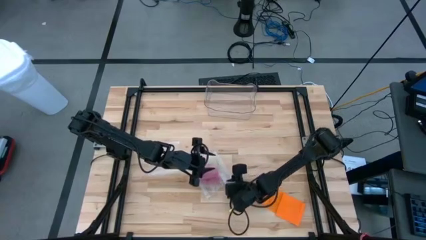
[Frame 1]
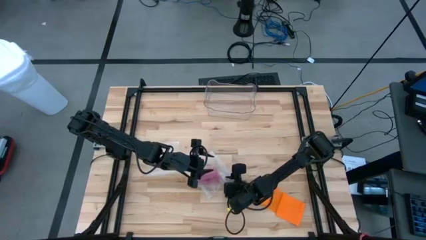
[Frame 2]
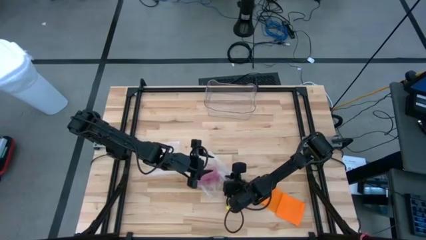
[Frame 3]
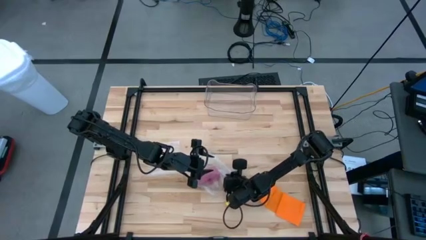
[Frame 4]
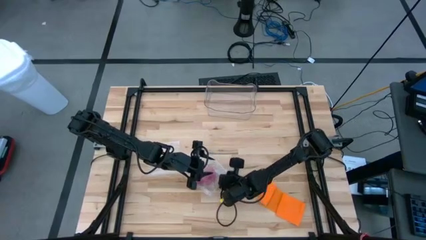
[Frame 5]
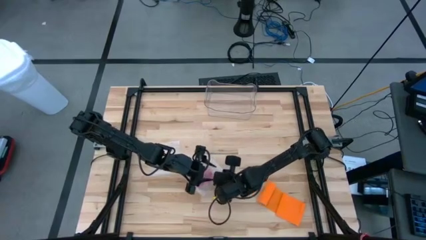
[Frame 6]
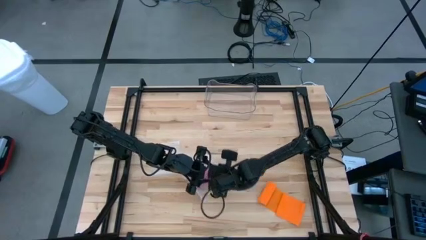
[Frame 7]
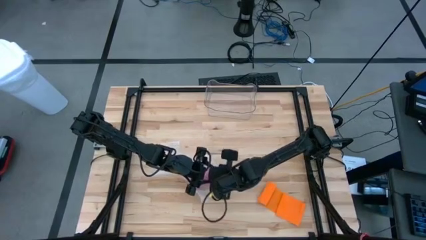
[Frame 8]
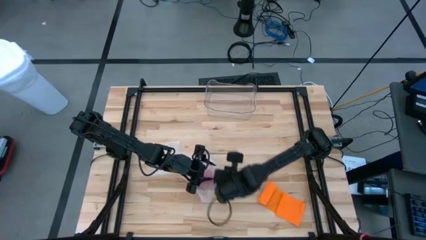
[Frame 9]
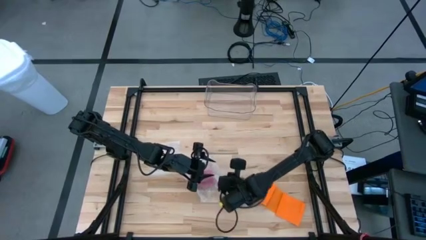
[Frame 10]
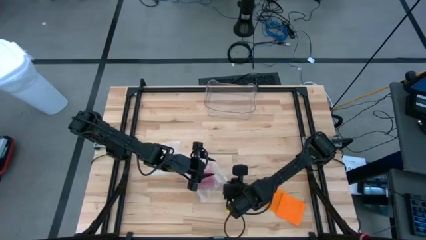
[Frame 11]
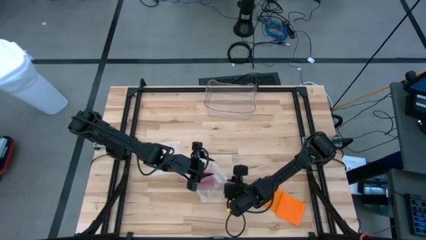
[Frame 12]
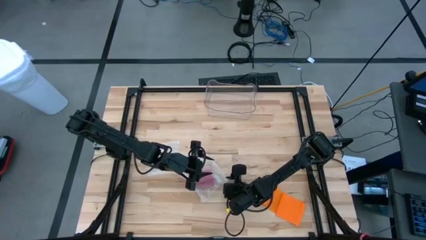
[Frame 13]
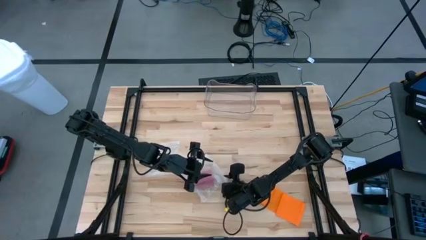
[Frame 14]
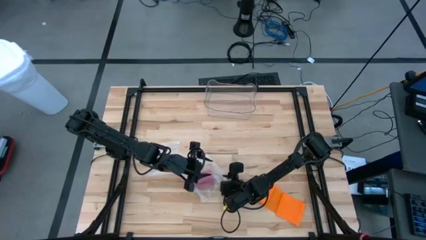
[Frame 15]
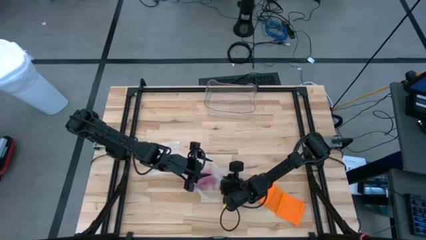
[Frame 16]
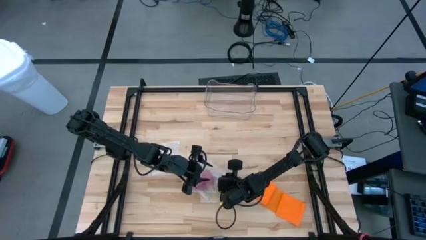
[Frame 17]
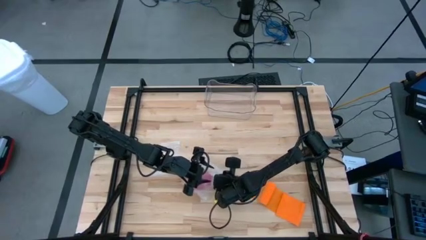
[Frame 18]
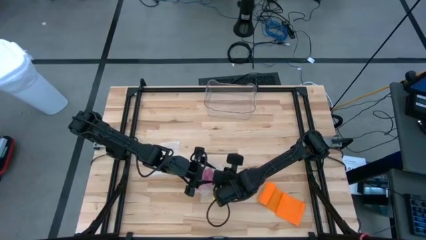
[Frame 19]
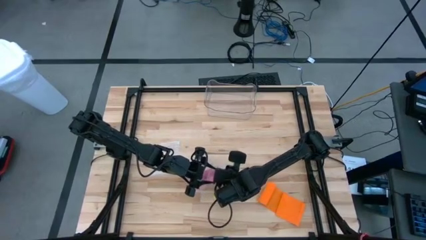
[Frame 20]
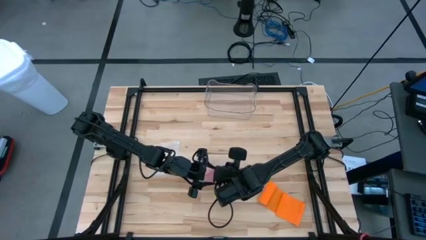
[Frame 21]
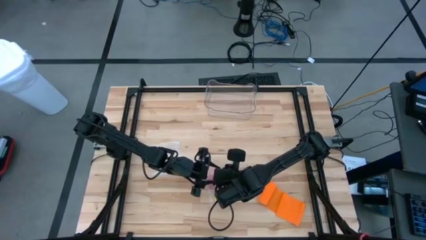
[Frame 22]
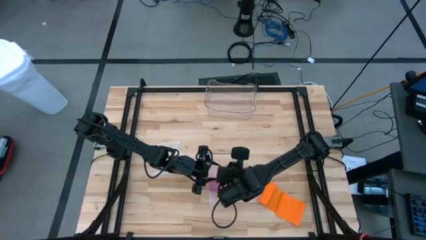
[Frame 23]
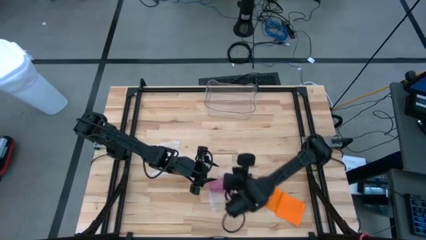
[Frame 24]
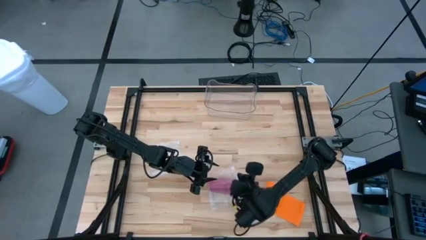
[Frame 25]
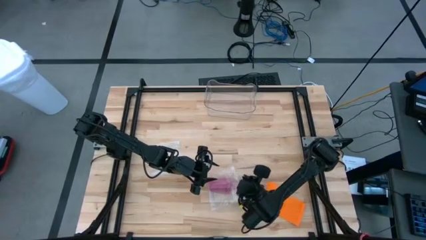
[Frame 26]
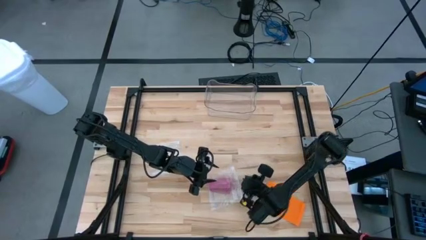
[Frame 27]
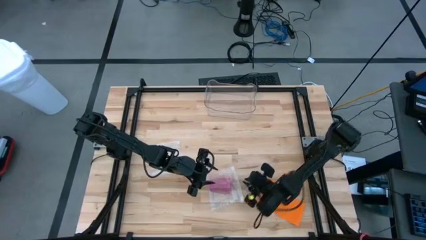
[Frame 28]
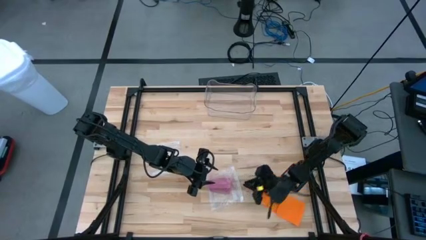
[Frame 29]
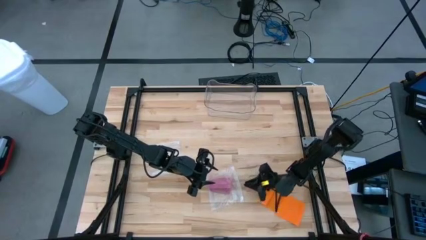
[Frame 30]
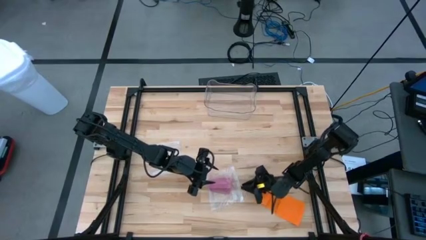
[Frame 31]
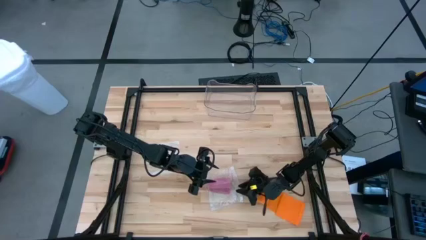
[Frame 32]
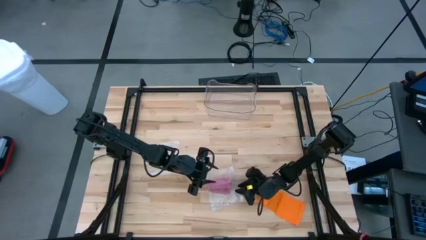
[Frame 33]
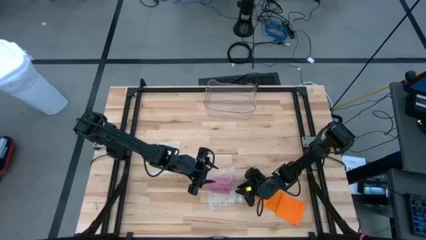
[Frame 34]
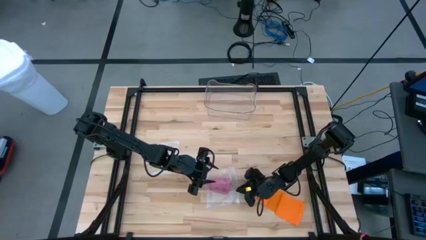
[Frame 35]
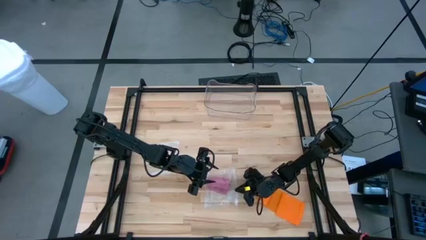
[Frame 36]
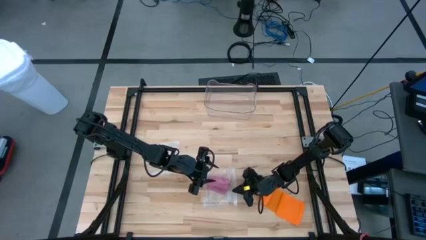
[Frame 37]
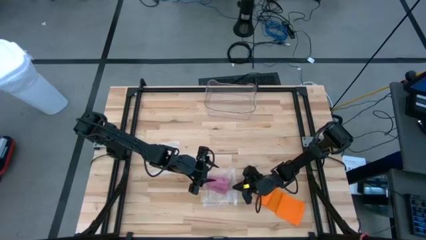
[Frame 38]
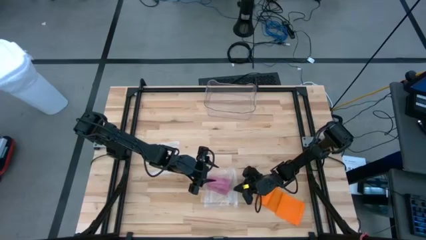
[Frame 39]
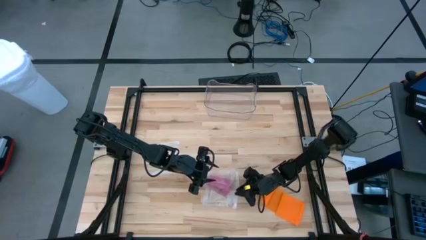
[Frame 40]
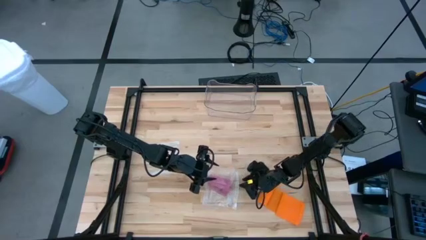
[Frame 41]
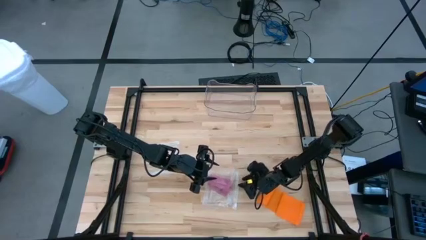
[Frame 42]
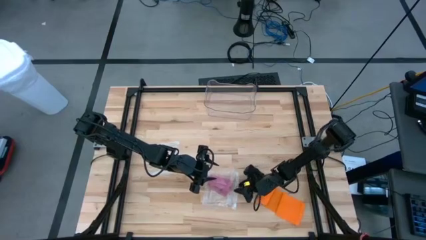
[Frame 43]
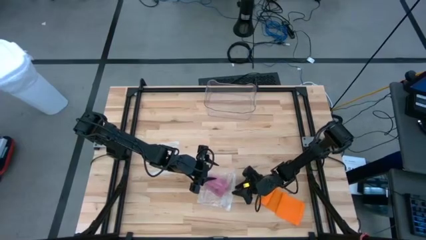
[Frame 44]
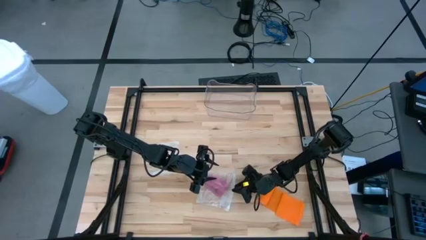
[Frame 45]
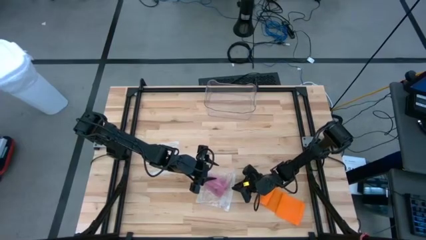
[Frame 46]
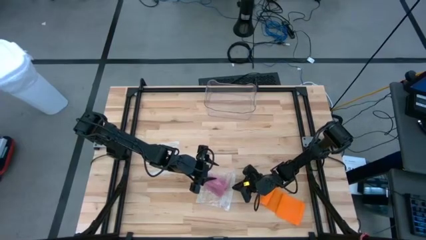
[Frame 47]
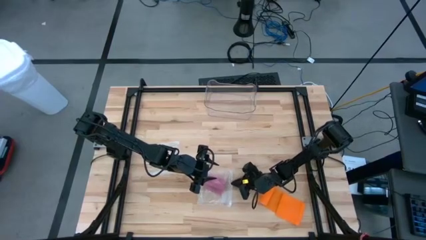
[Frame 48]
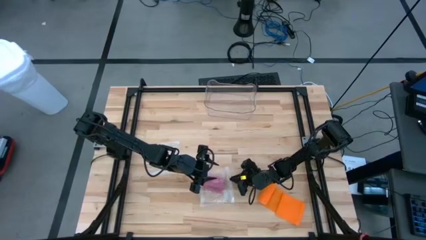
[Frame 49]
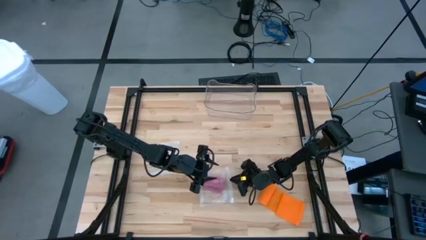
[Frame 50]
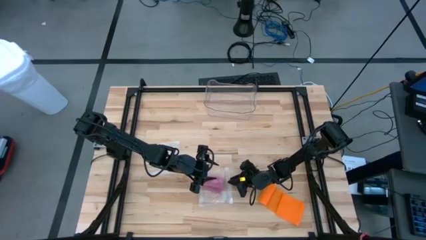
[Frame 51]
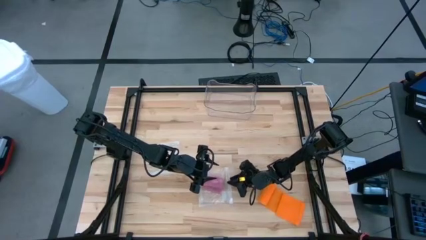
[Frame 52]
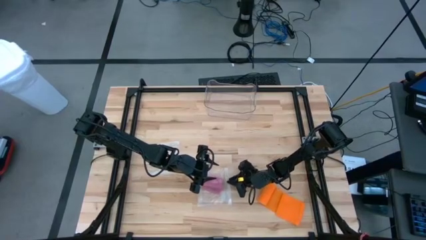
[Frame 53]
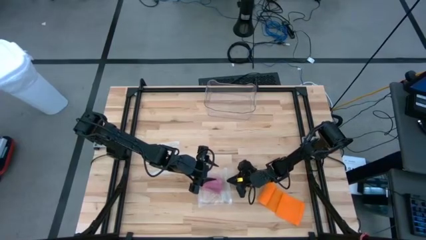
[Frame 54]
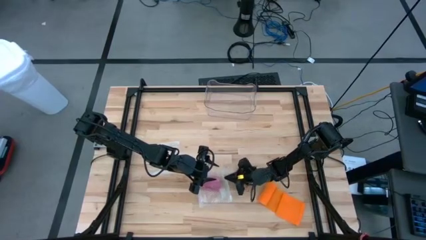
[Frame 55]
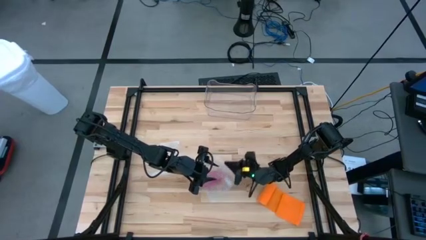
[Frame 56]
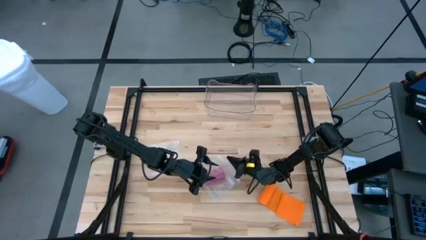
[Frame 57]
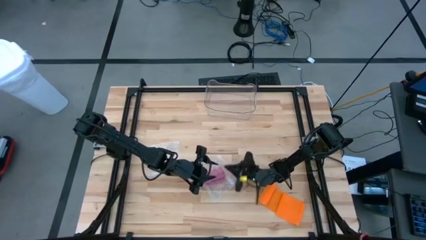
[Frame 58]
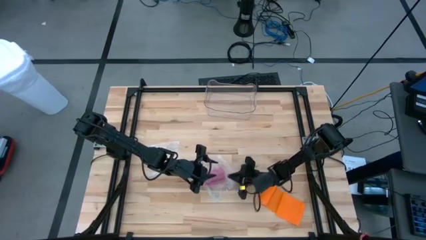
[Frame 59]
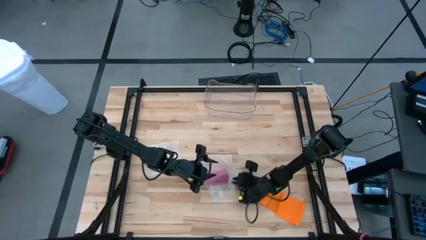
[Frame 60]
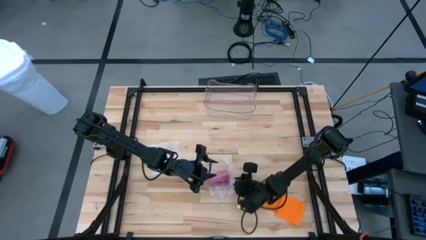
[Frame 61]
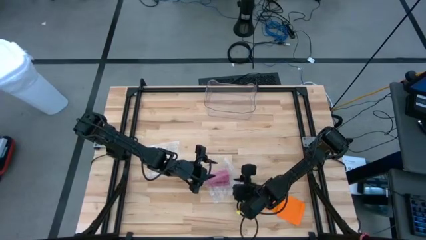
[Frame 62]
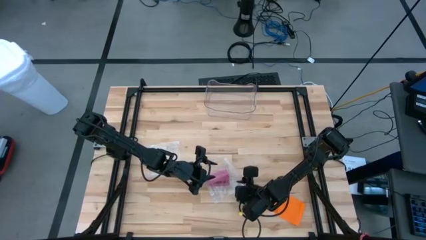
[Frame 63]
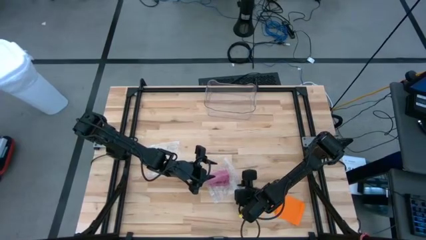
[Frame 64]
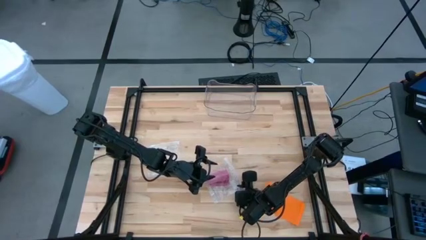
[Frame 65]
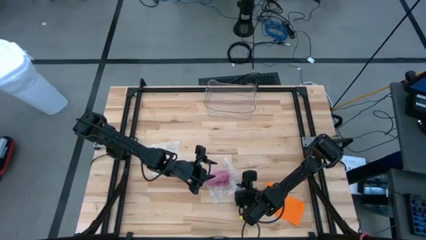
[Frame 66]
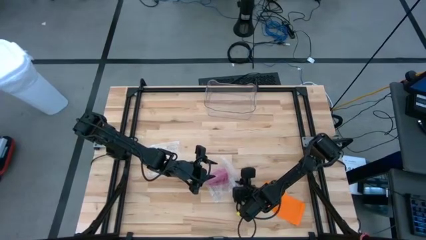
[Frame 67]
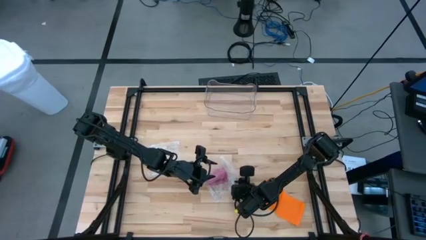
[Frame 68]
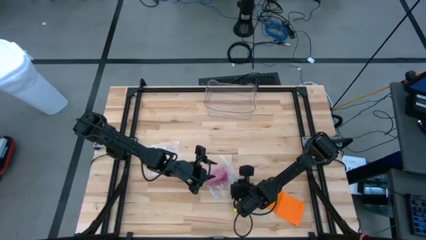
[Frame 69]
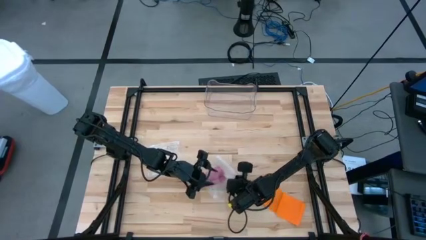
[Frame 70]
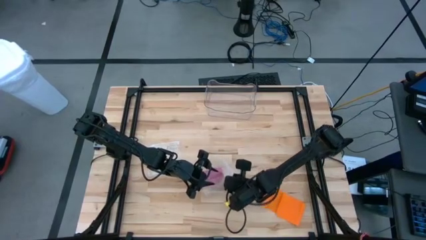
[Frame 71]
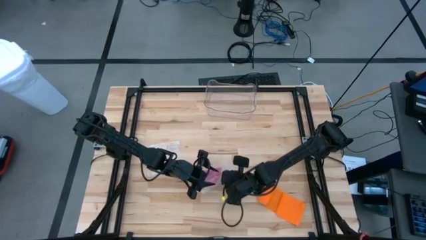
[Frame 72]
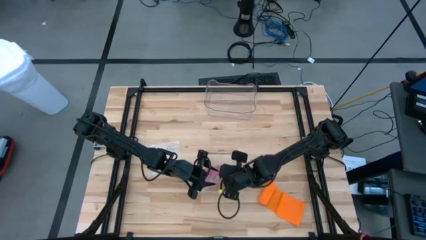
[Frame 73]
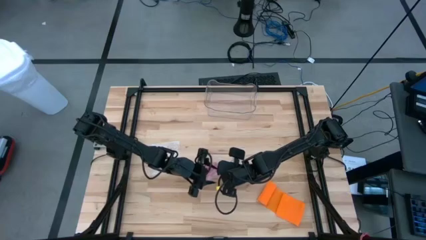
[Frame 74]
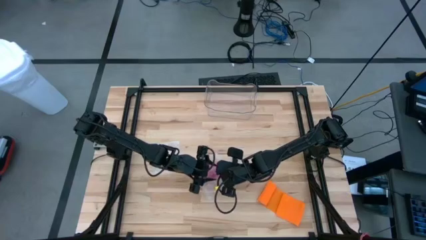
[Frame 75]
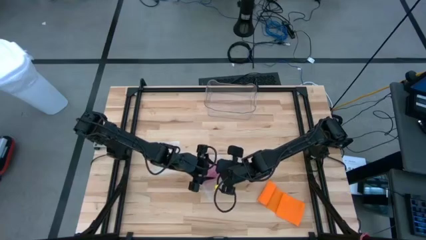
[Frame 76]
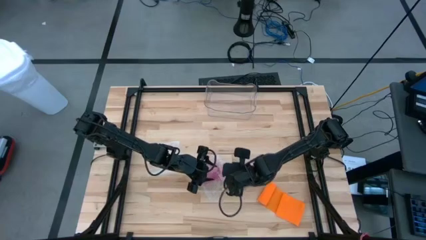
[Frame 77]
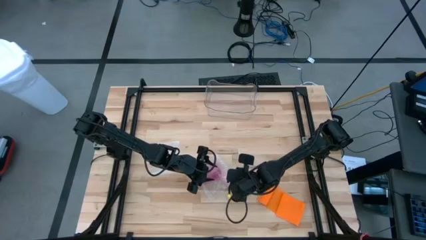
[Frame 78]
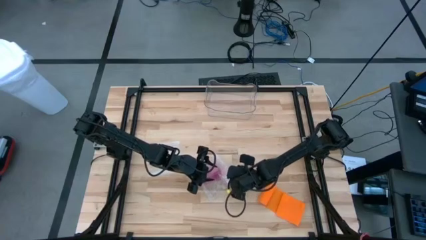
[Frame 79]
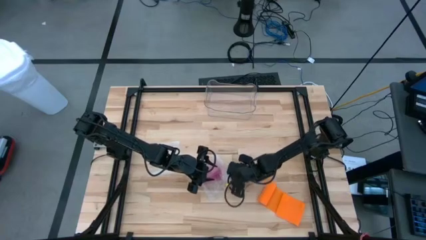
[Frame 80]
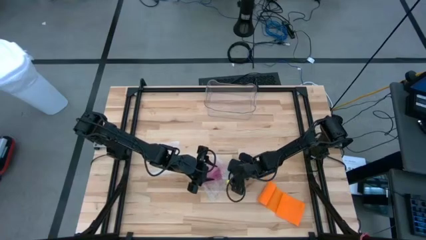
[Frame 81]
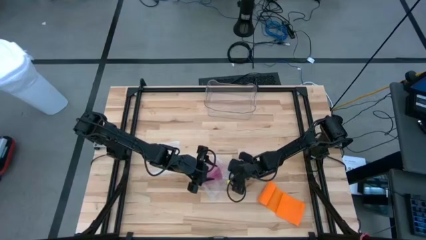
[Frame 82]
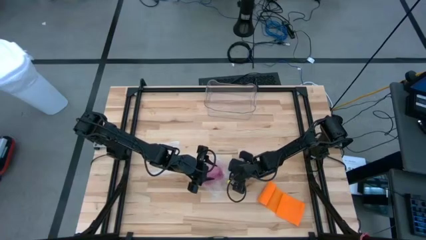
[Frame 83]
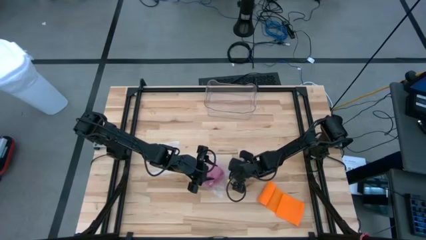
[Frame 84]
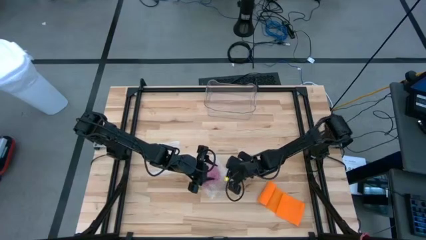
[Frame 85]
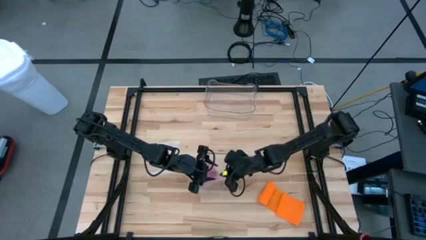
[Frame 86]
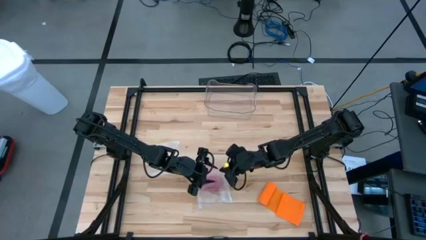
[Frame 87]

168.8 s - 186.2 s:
Task: Roll bandage
Close the zip bag
